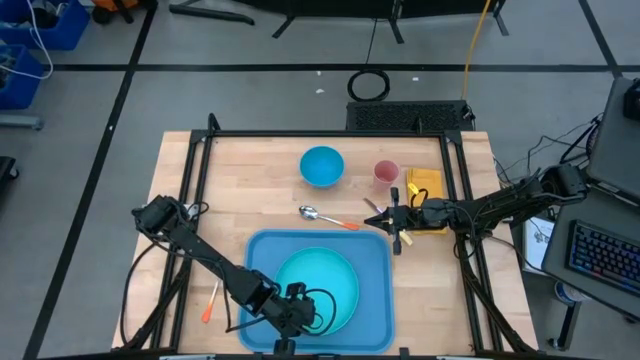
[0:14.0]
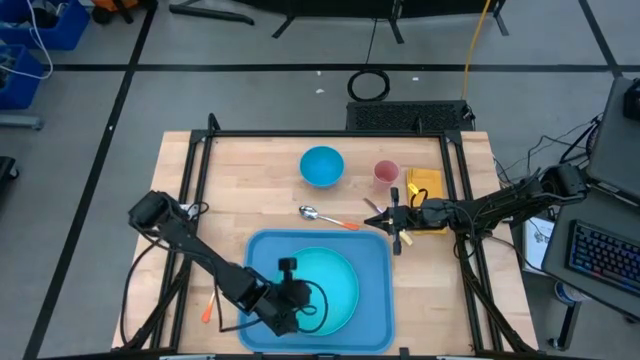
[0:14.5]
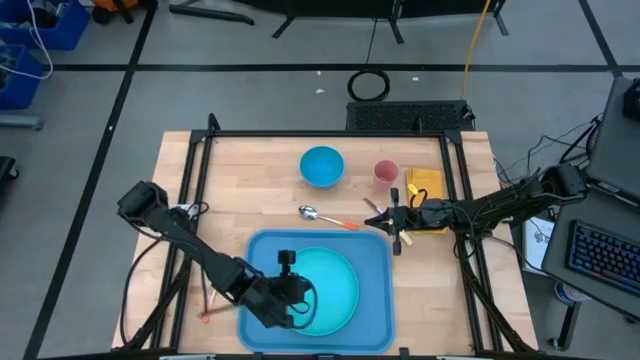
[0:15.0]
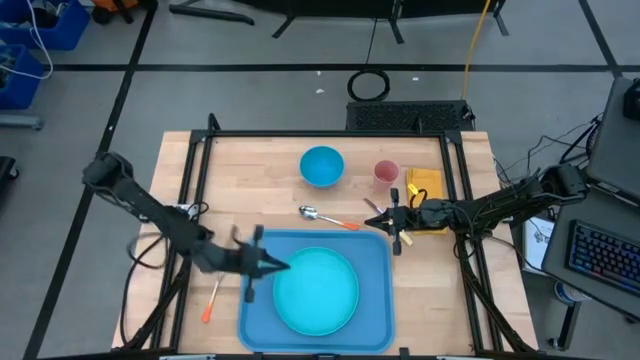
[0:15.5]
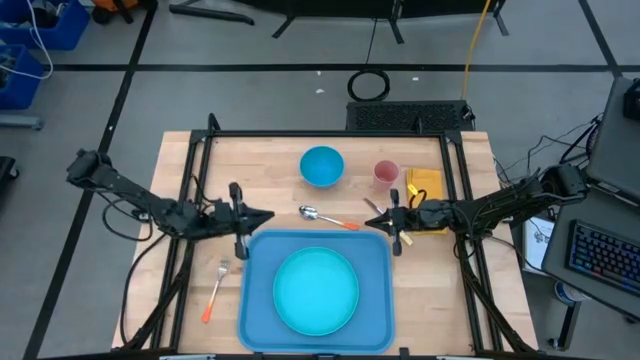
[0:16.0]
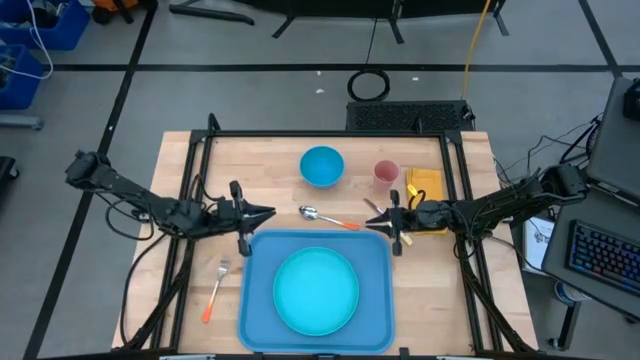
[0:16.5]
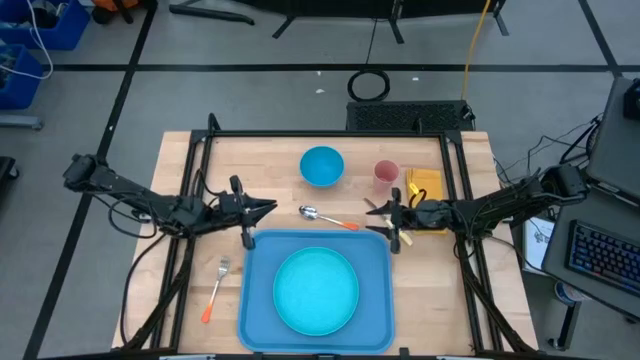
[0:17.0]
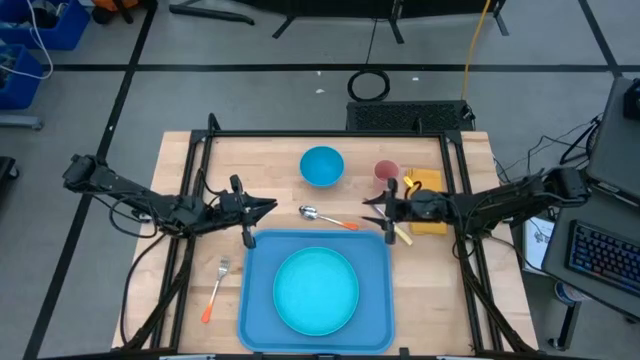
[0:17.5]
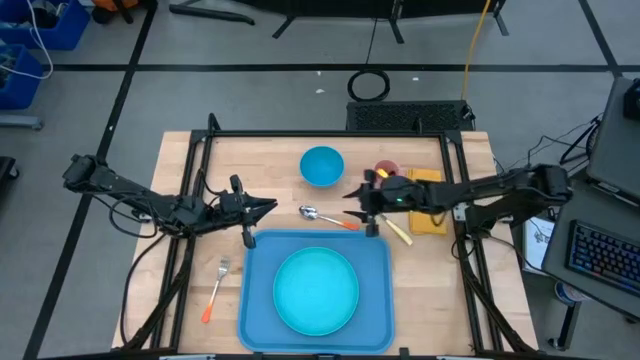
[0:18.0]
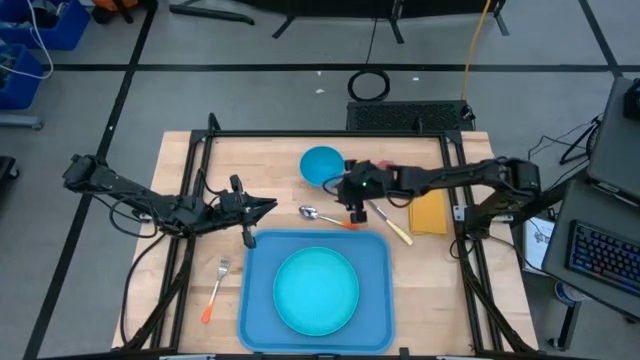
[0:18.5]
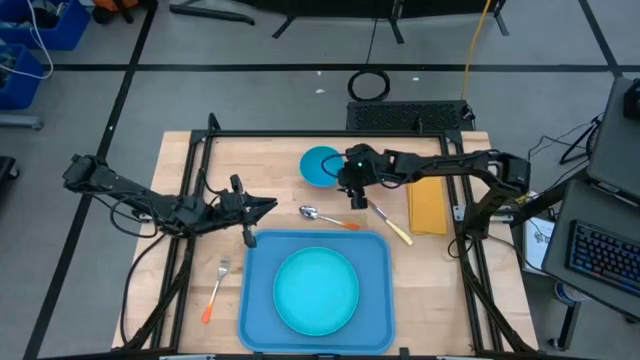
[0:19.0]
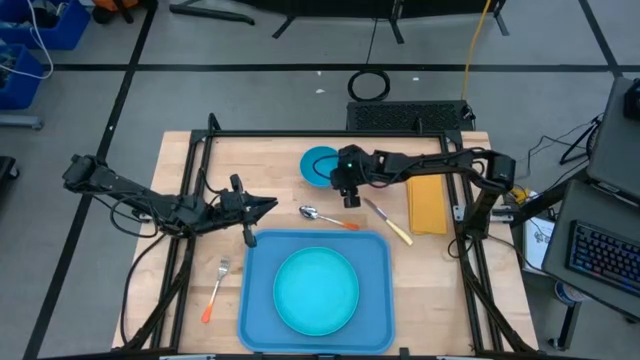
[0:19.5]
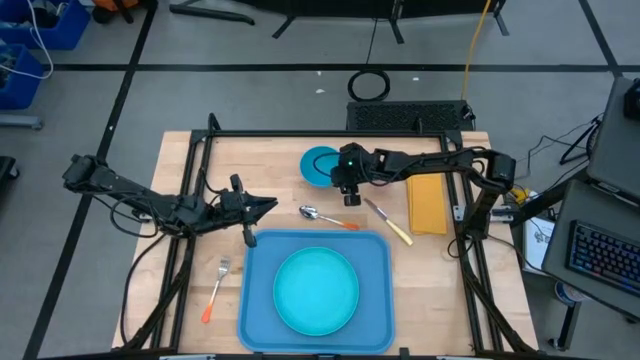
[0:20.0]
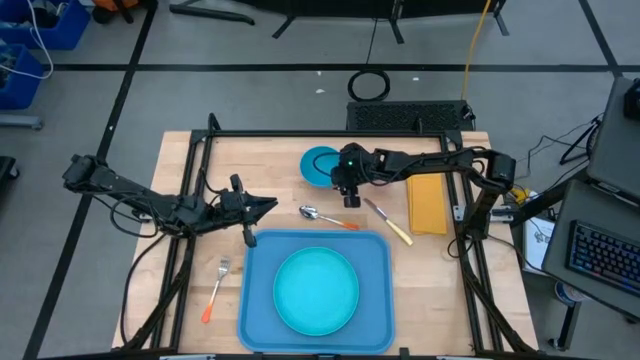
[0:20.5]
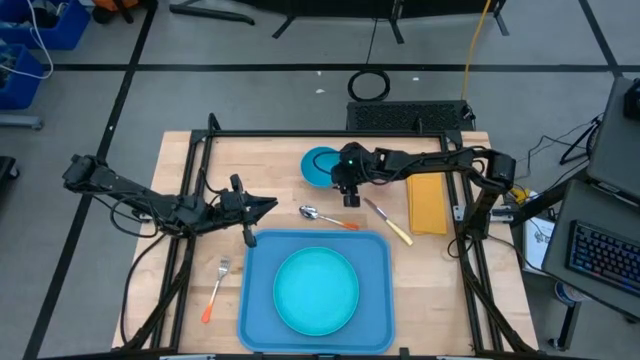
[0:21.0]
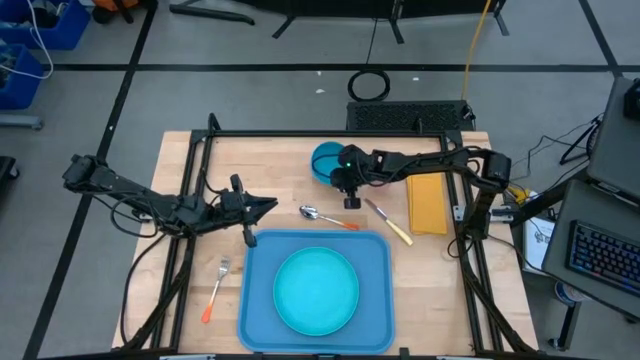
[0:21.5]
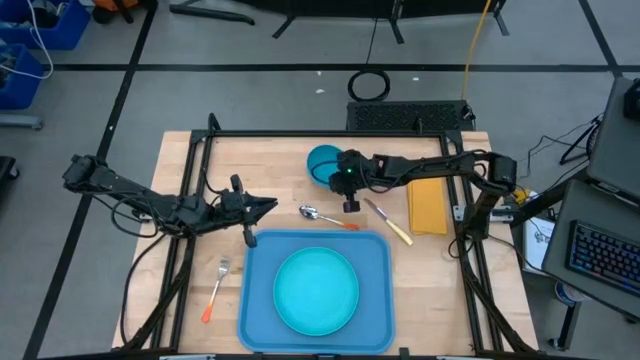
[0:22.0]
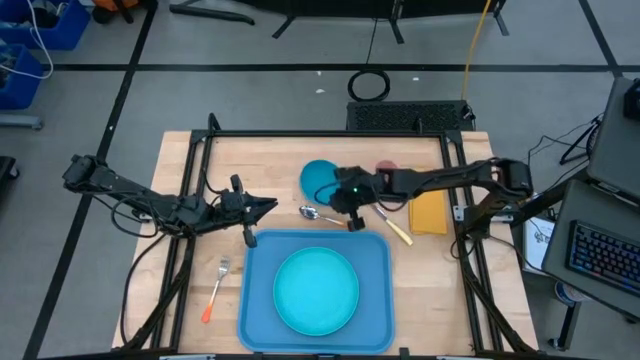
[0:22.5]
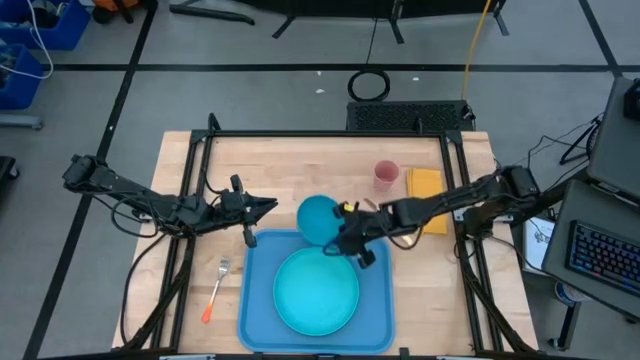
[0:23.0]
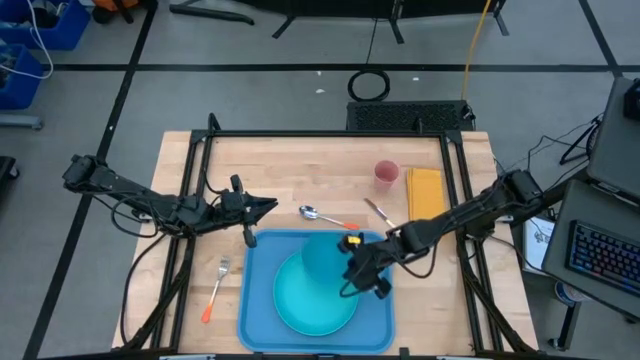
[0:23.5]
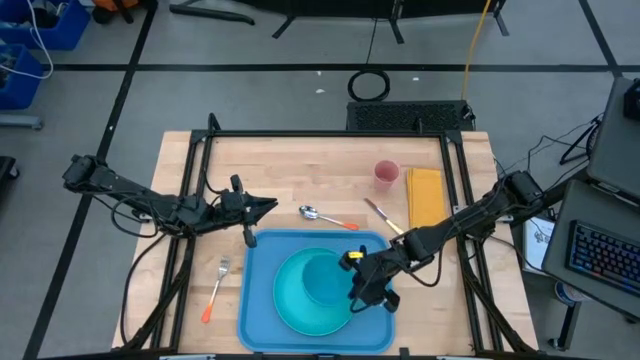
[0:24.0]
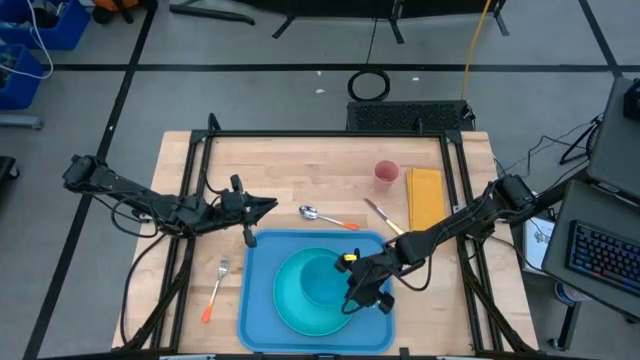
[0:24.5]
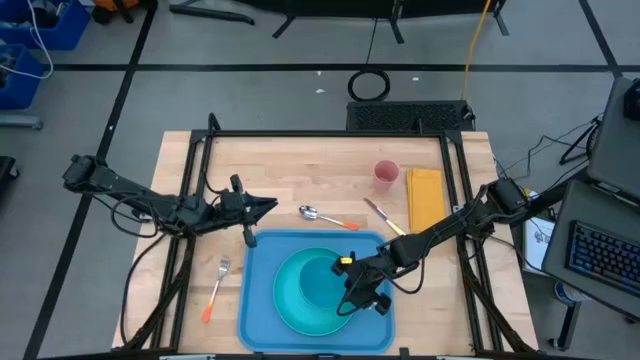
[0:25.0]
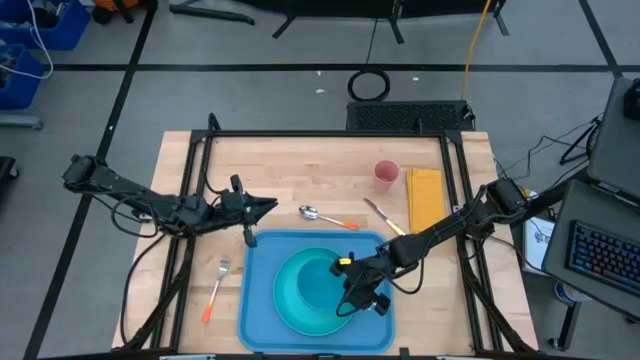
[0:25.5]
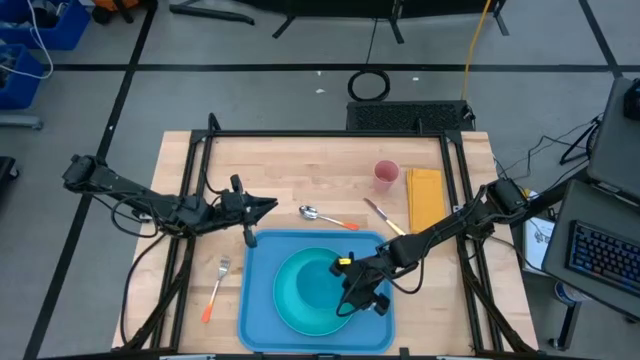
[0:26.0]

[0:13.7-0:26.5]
Task: Set up tray
Put the blue bowl on top of the green plate on the blue tray

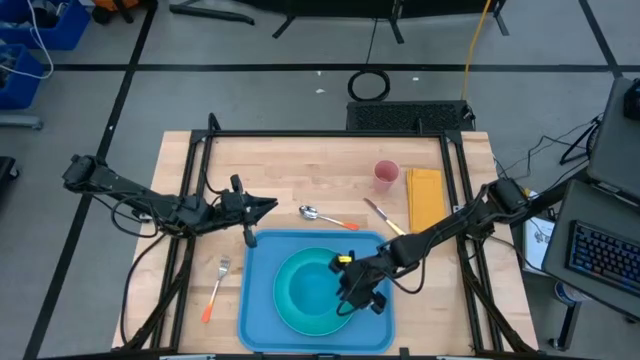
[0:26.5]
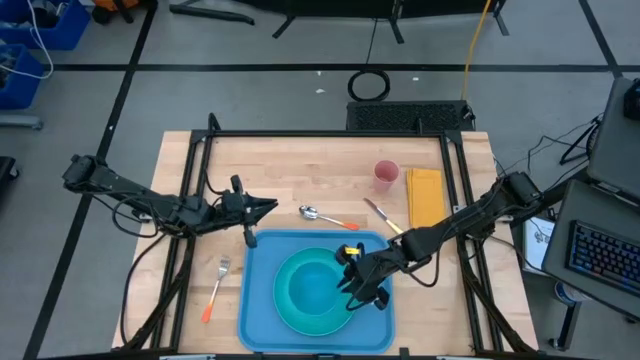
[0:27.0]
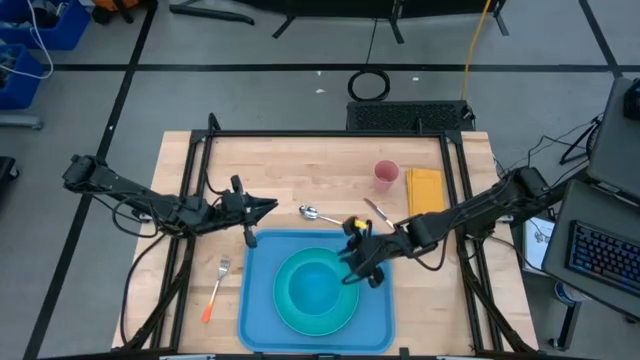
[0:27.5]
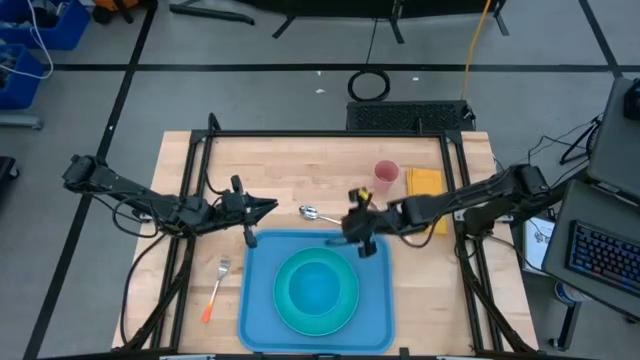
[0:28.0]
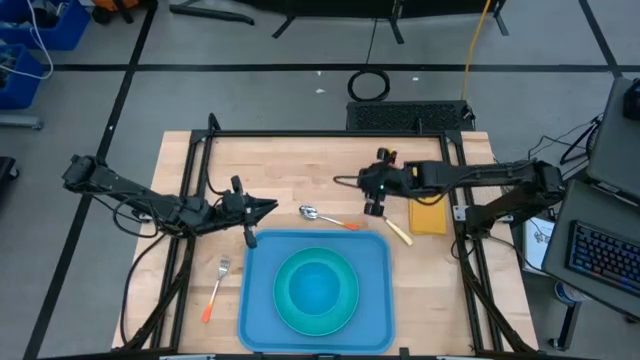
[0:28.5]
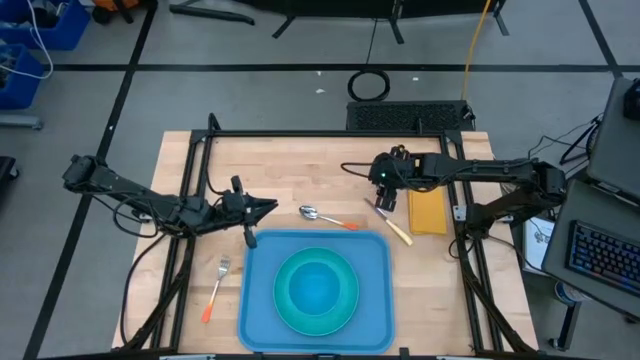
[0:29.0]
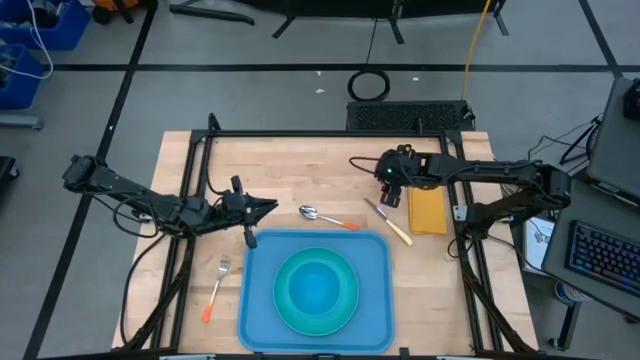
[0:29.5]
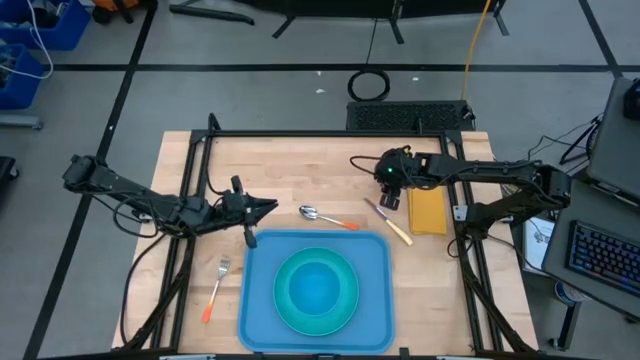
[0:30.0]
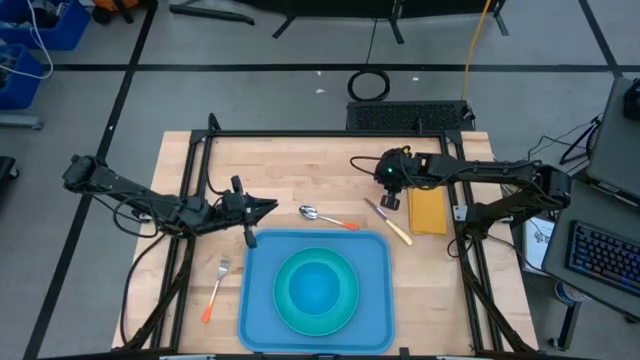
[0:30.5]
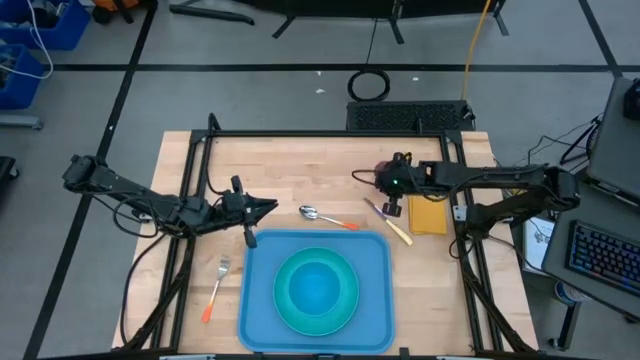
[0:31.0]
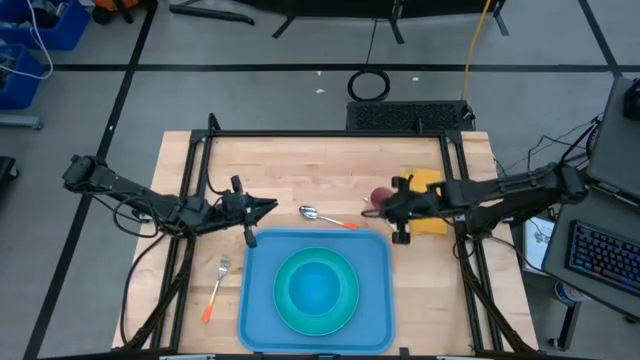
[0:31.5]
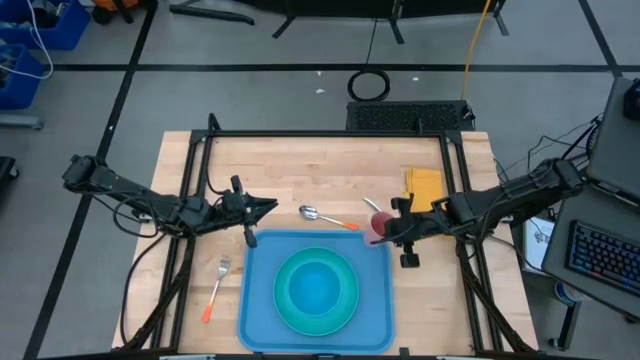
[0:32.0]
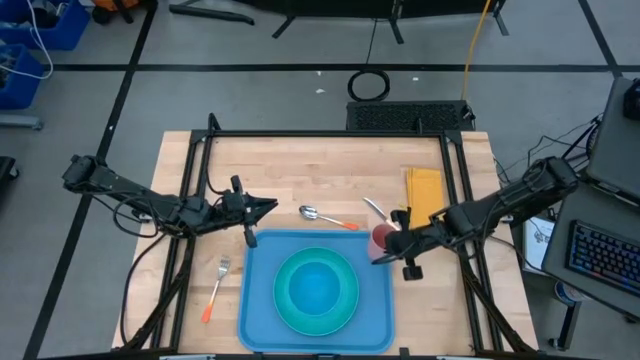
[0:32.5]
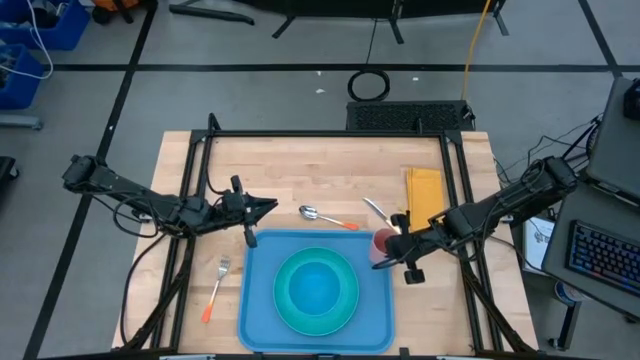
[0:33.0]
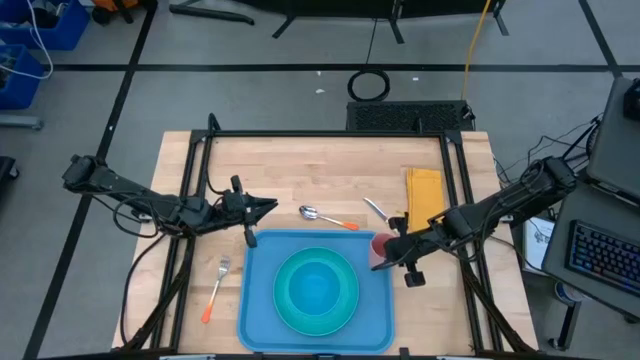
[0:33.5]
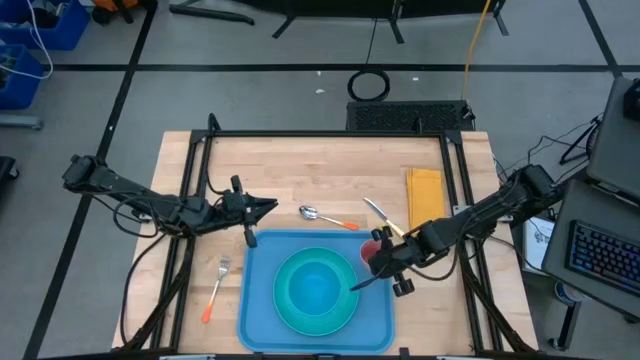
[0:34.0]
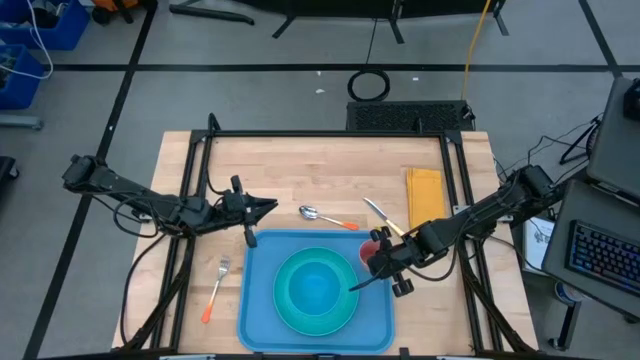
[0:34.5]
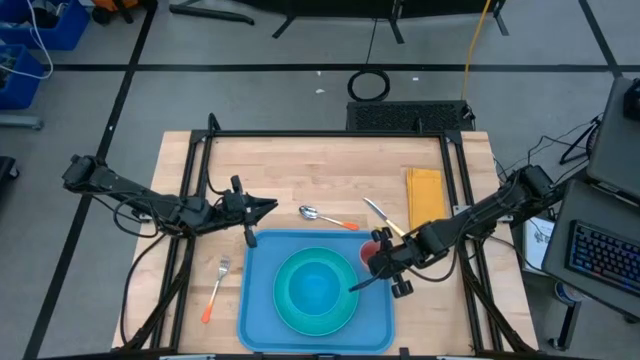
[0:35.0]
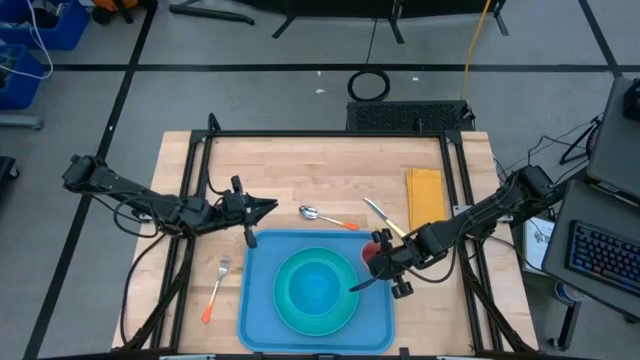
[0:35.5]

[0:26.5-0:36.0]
Put the pink cup on the blue tray to the top right of the green plate
